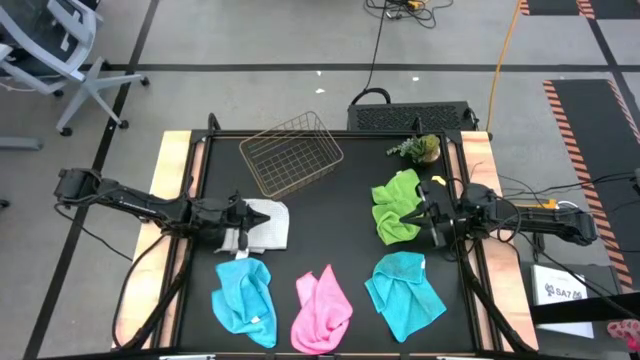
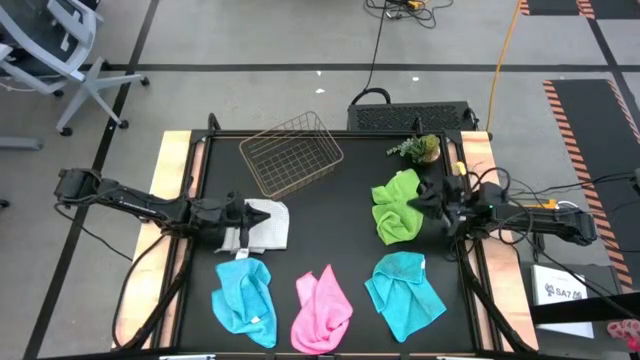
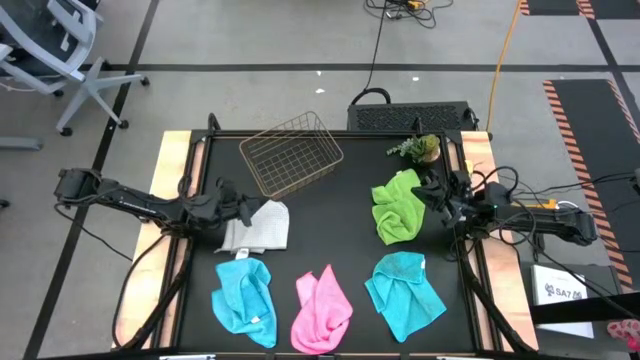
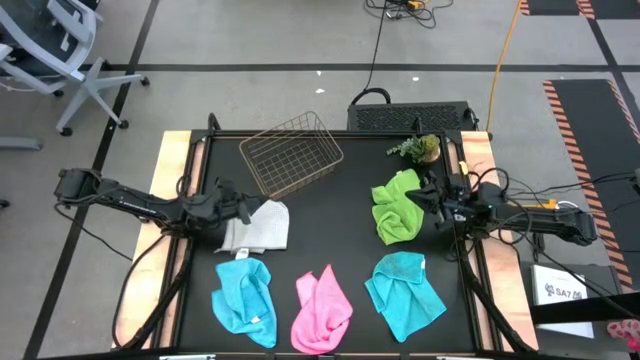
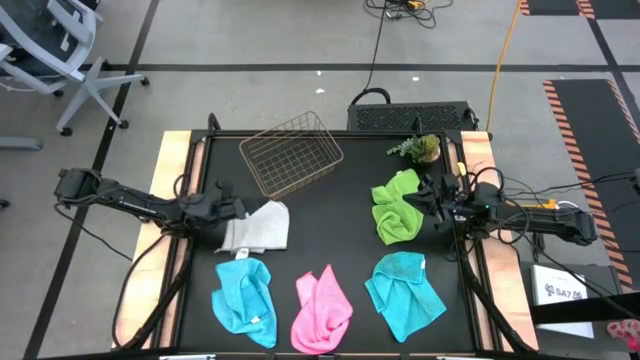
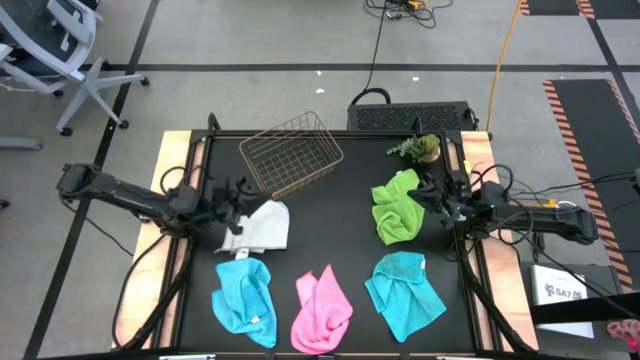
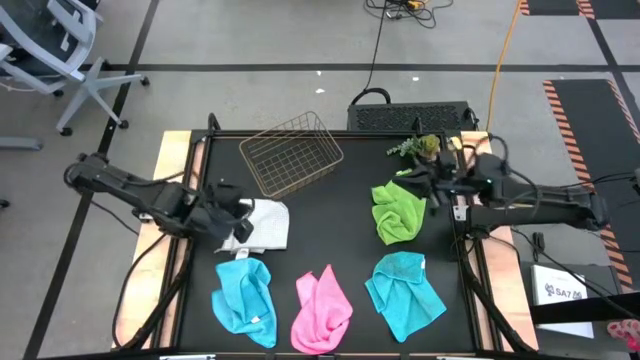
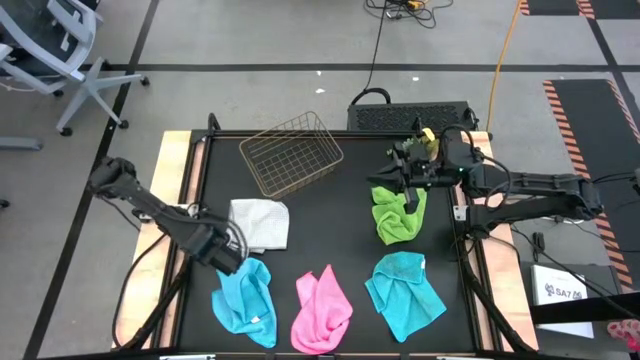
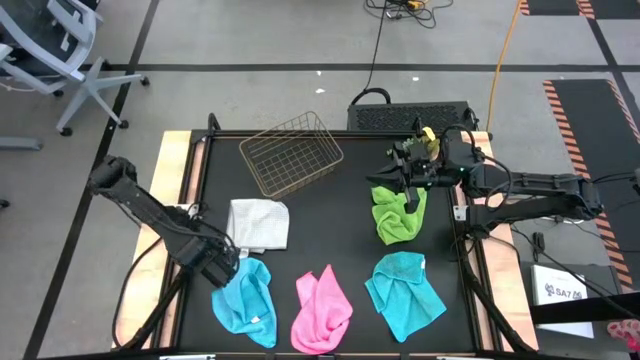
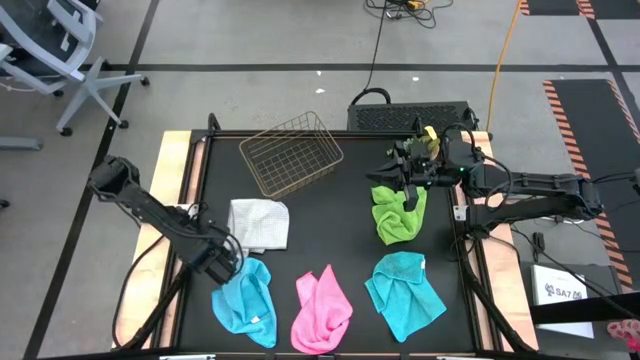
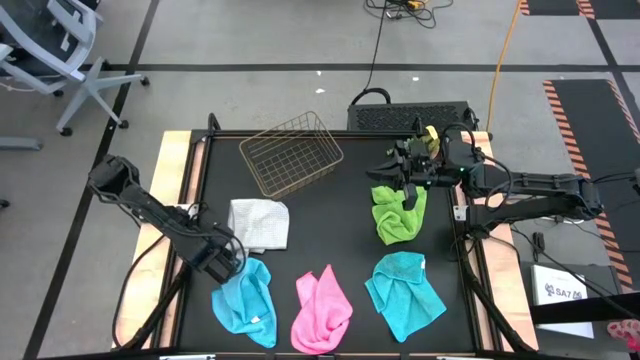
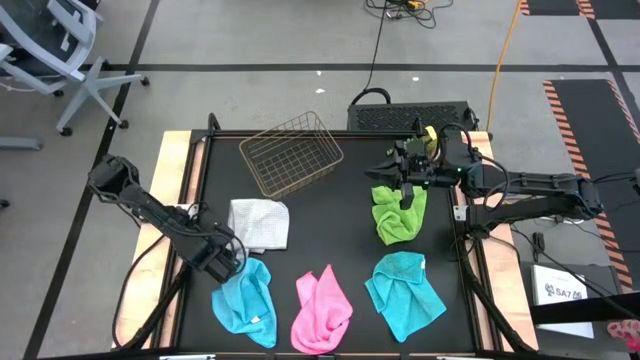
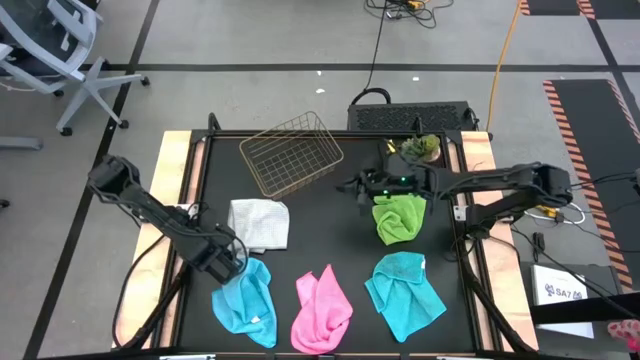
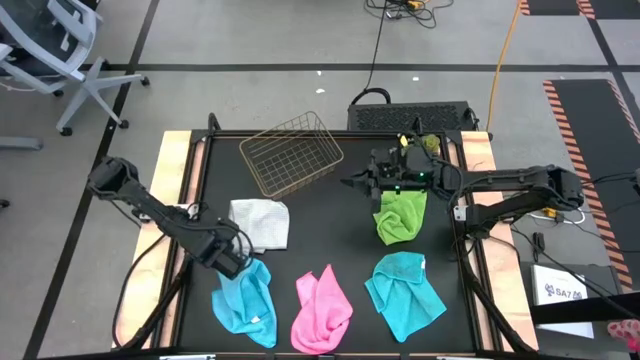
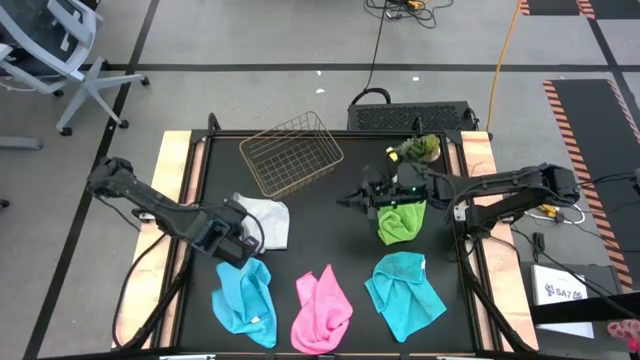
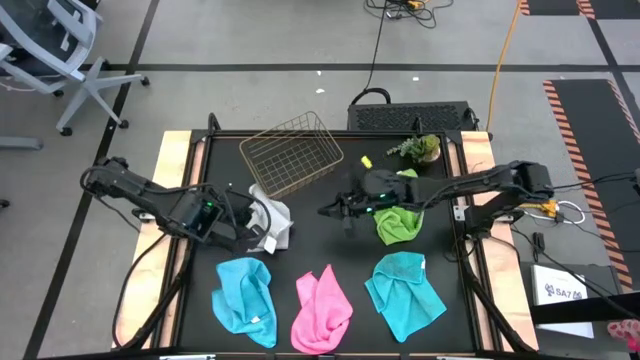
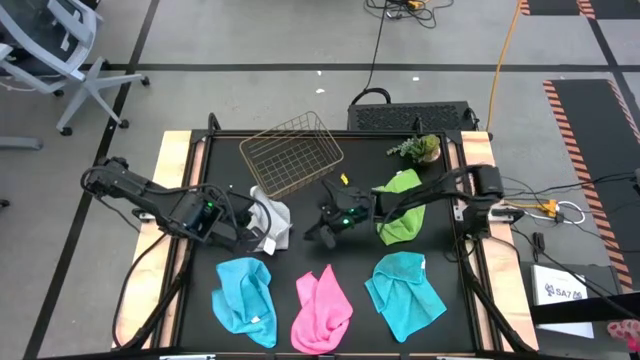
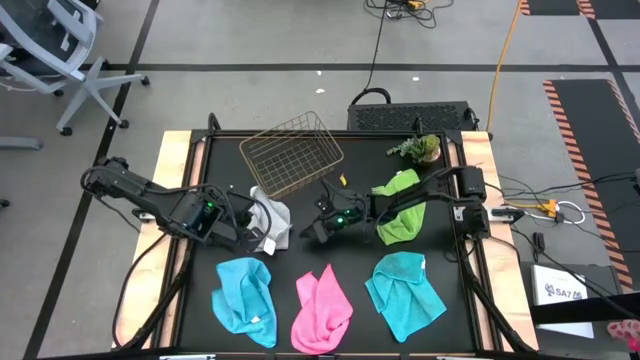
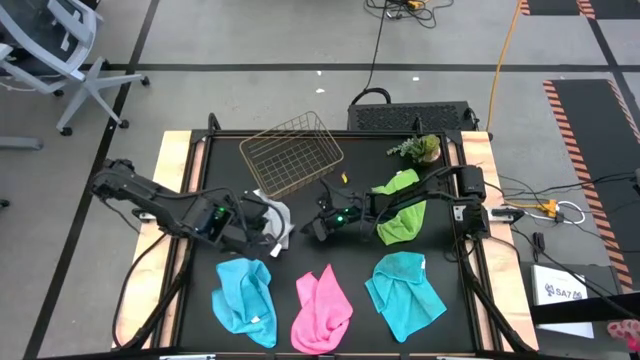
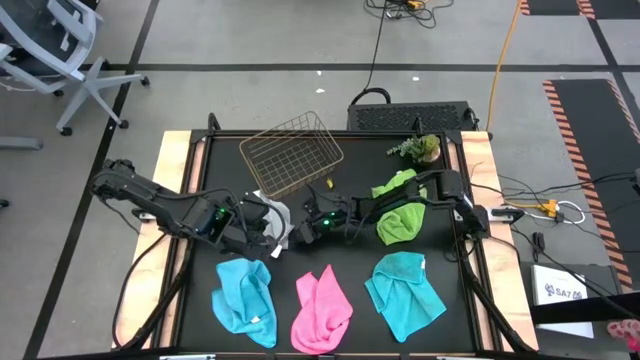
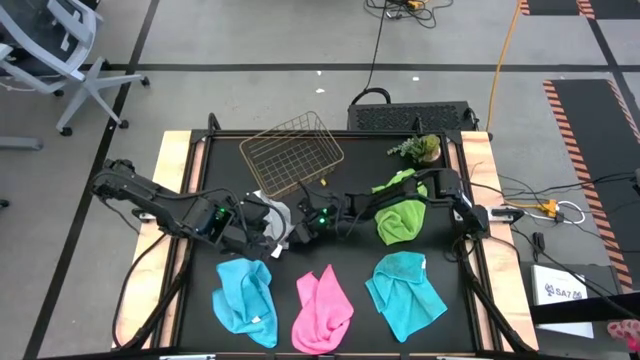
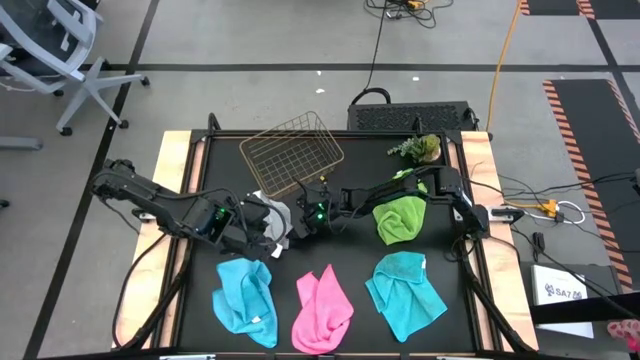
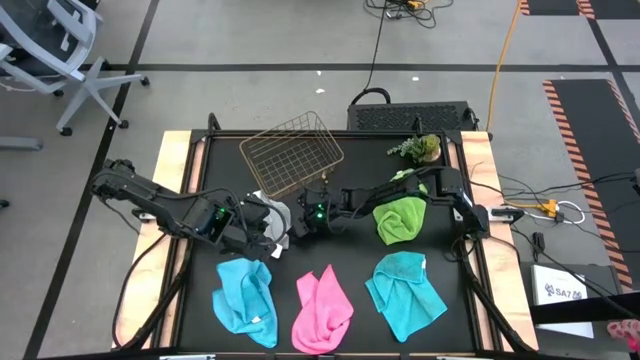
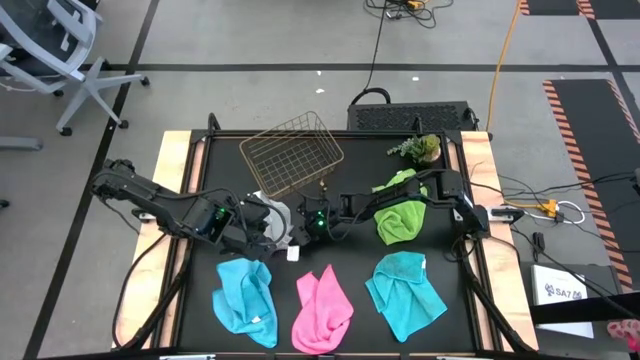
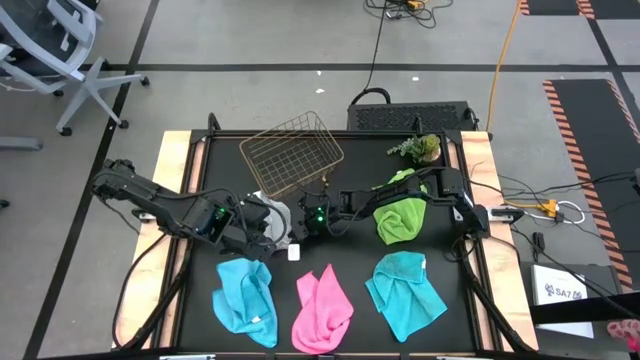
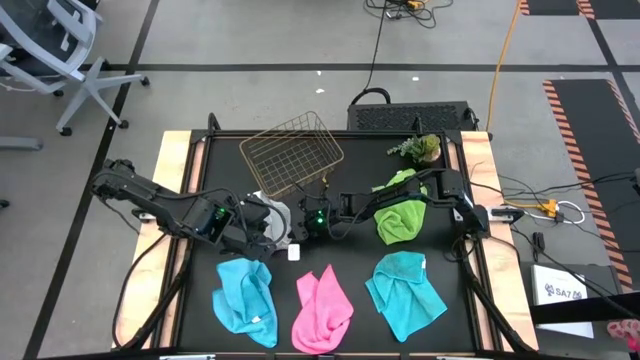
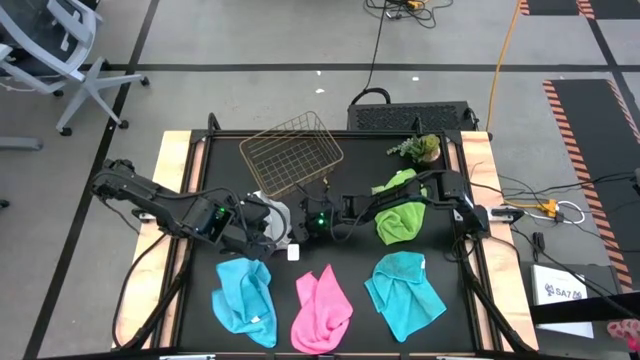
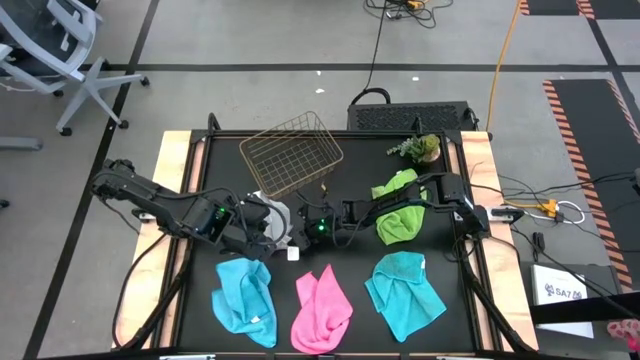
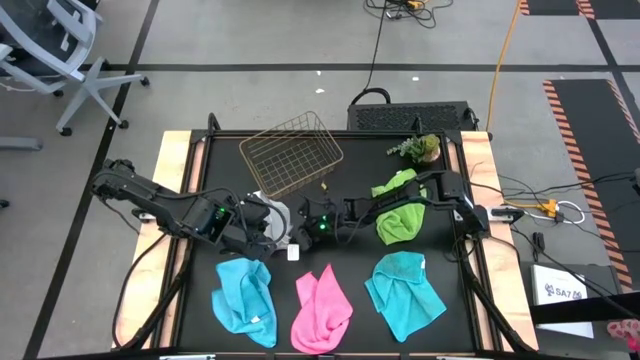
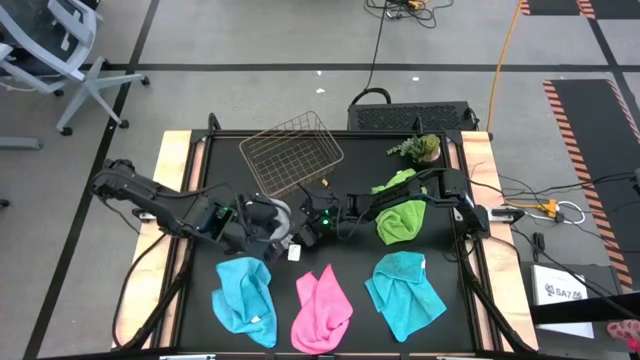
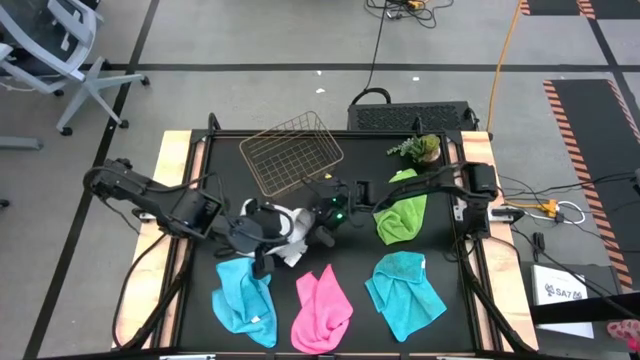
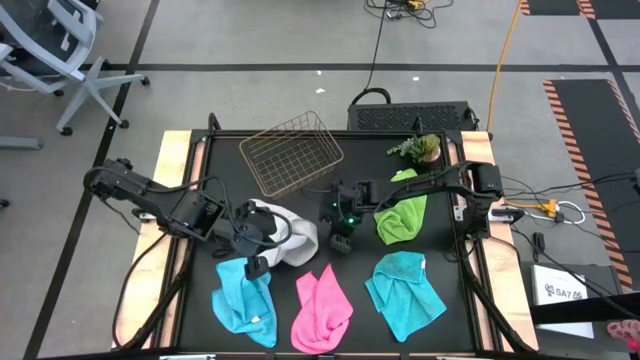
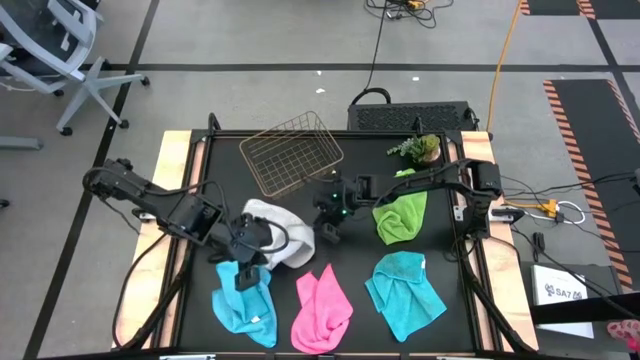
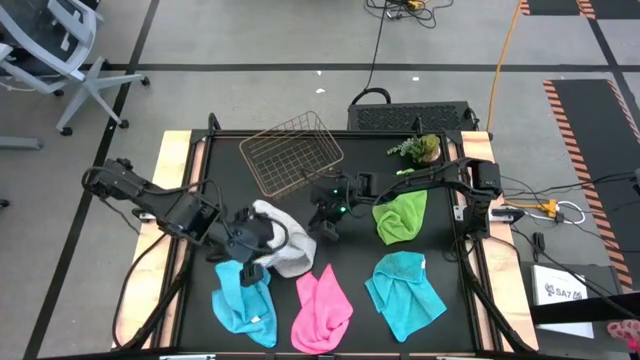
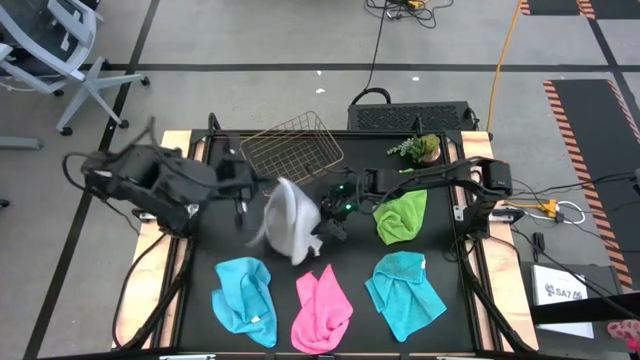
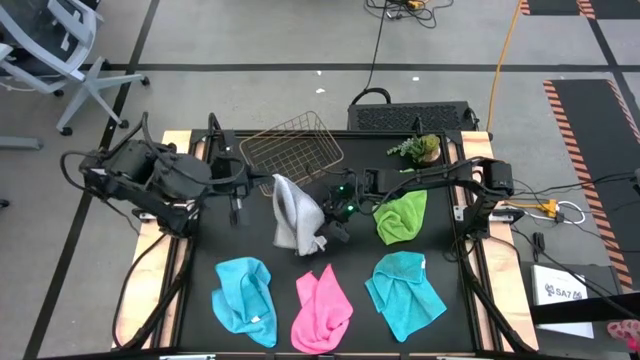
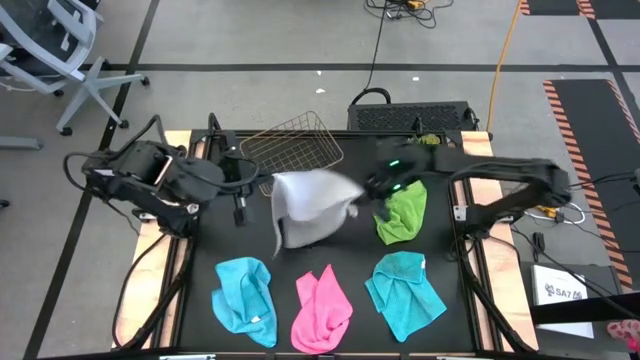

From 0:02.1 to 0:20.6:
Task: Fold microfiber towels
Fold the gray microfiber cloth
